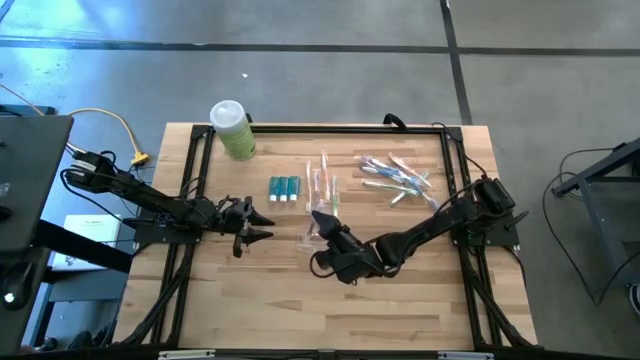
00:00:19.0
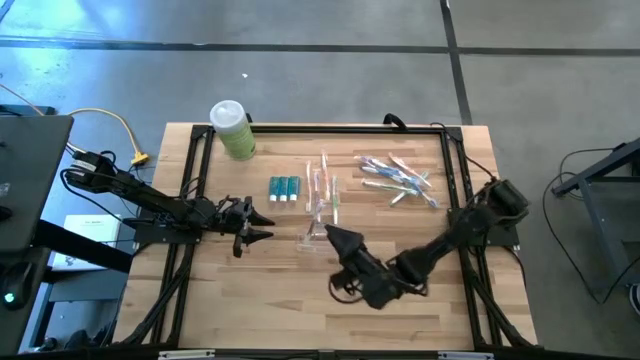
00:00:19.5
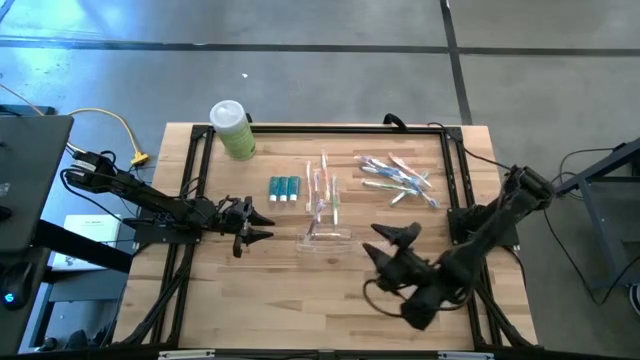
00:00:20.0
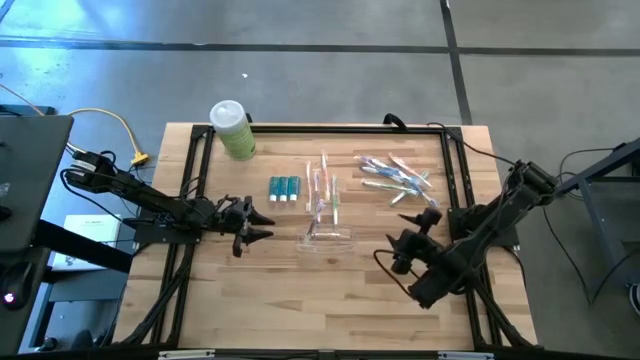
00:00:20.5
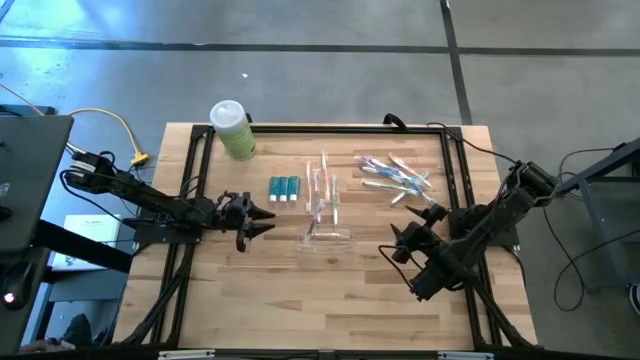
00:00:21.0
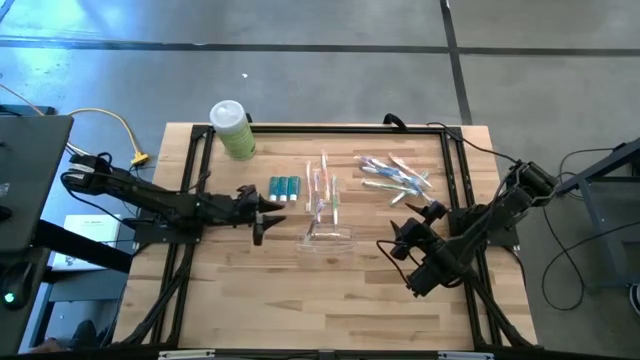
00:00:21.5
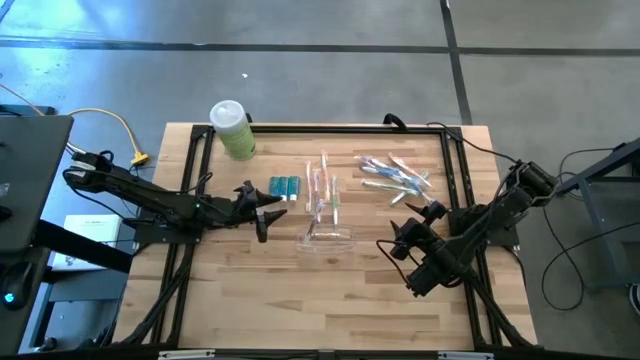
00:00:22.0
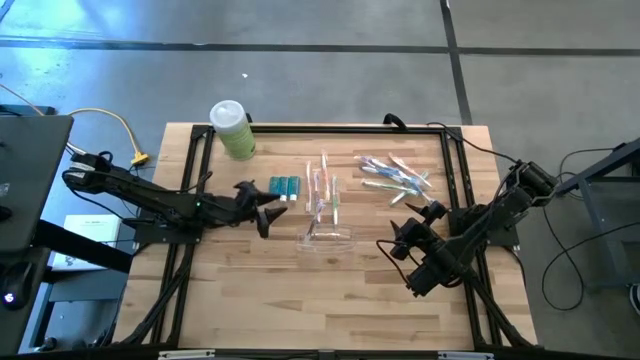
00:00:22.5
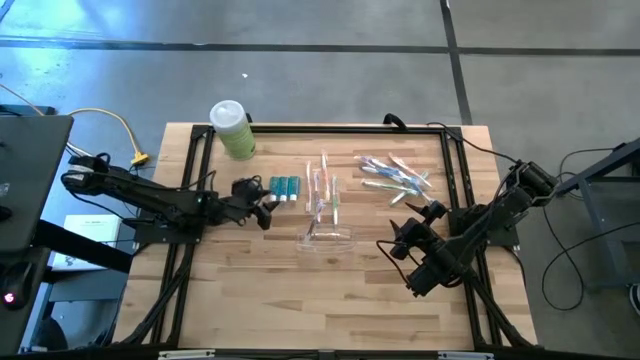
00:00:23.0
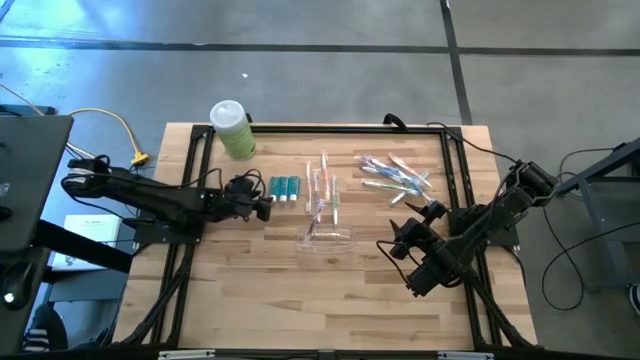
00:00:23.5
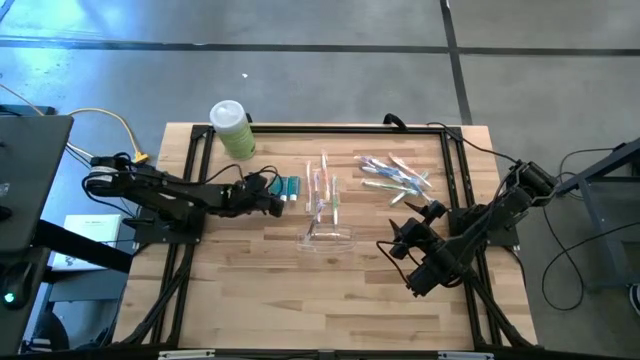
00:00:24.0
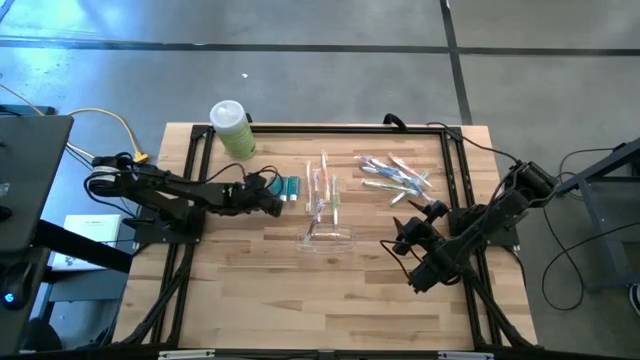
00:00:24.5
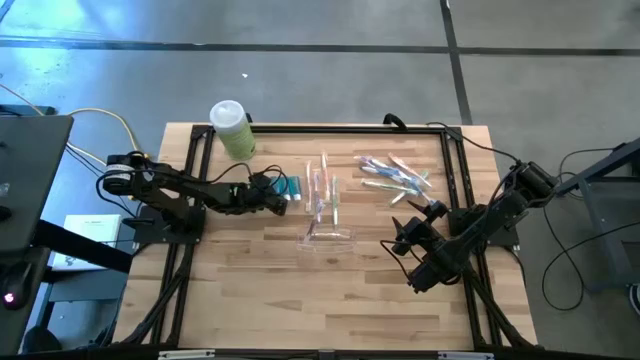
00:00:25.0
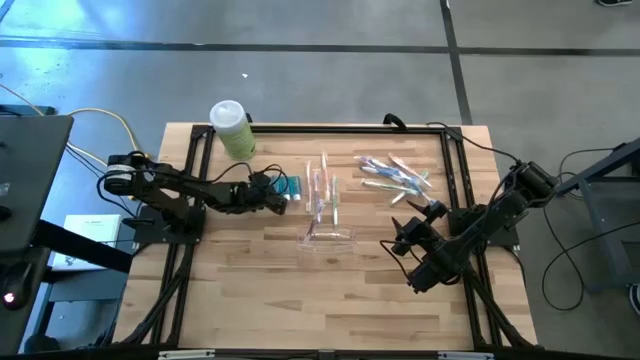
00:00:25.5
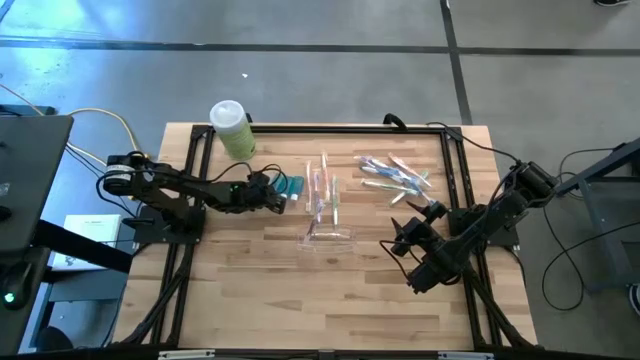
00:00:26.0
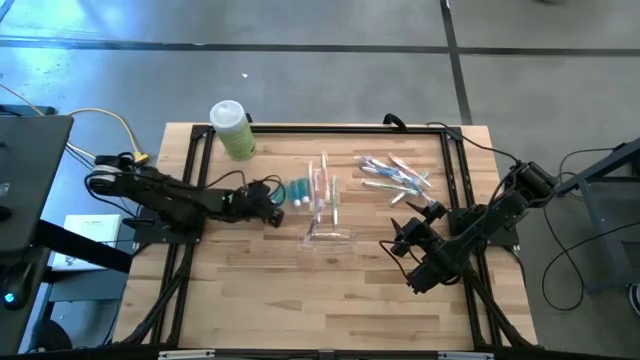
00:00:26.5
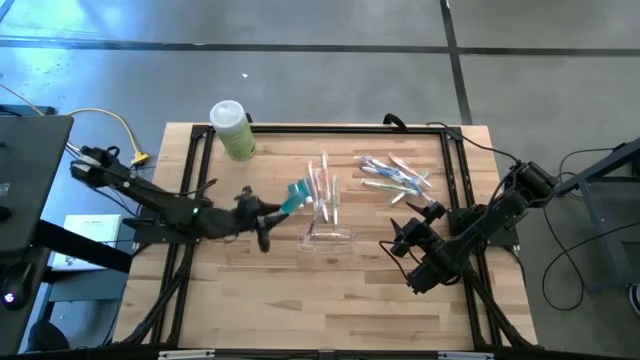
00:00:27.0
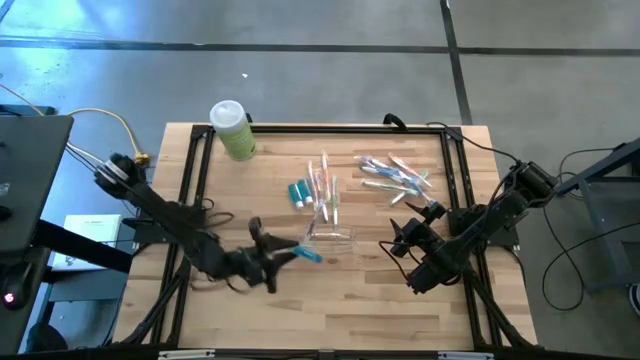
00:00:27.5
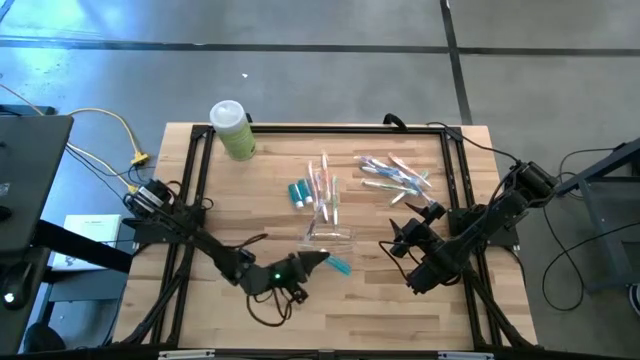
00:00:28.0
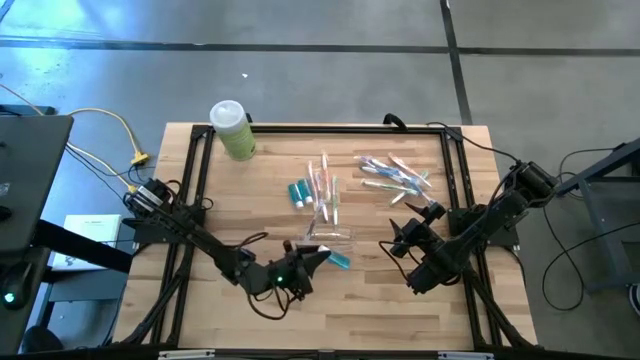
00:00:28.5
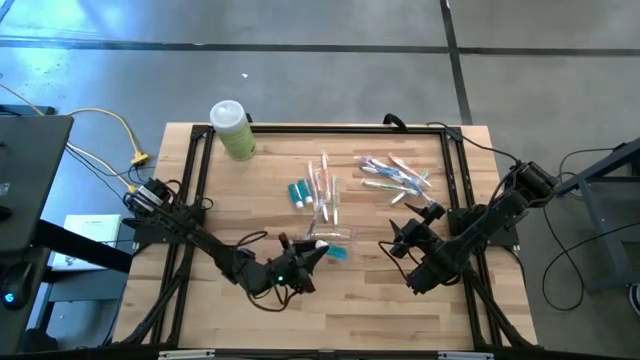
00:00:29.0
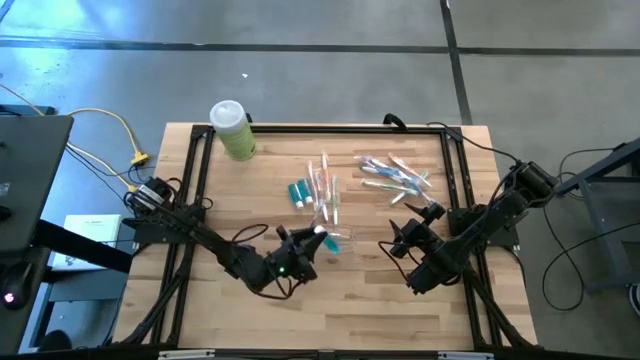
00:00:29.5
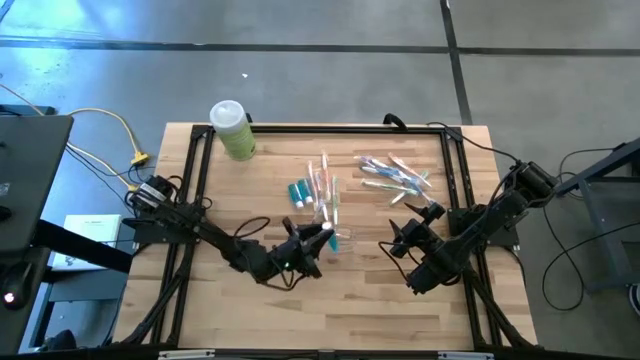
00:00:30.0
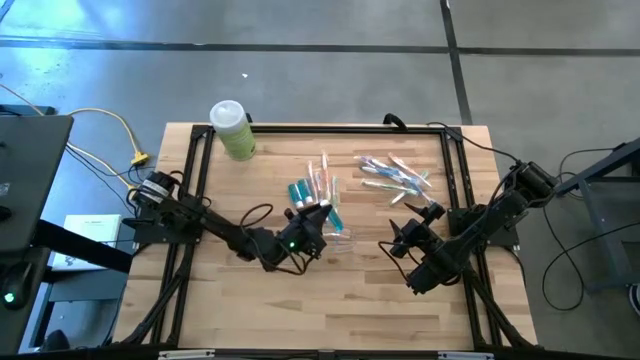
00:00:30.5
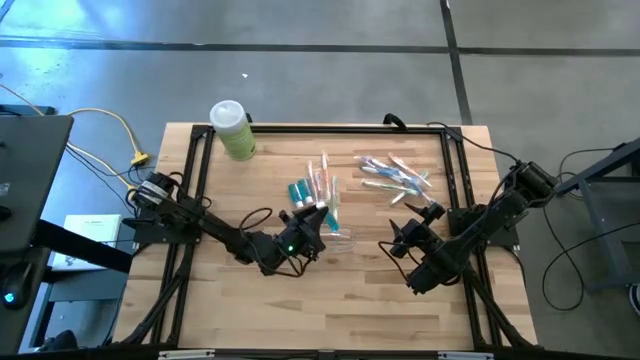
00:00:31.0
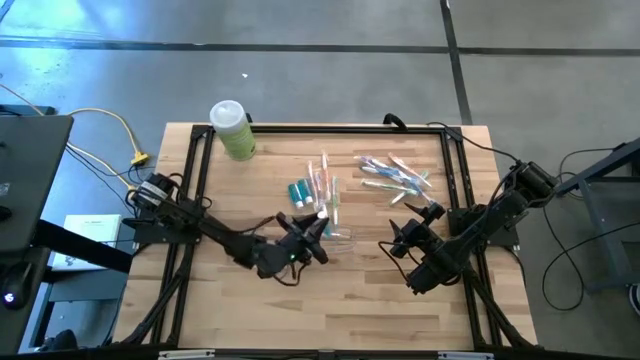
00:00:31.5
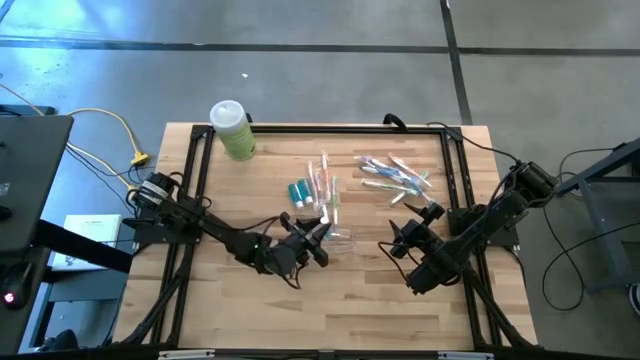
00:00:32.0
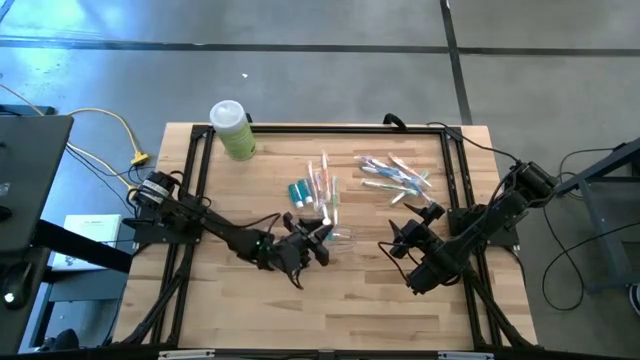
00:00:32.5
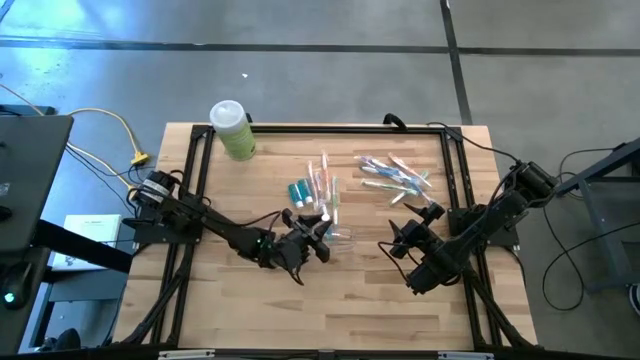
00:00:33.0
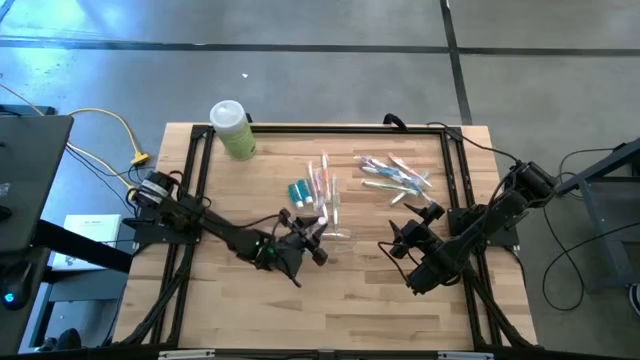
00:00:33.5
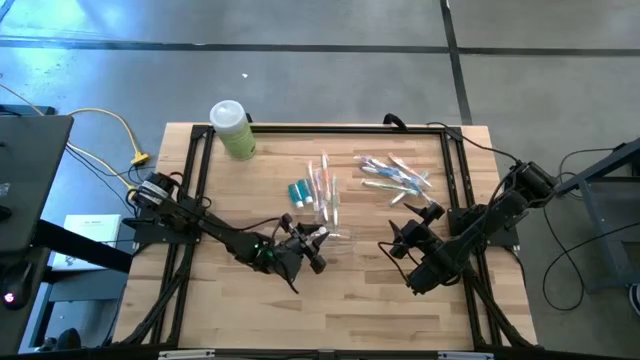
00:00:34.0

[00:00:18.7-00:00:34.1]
Task: Pick & Place toothbrushing station
Put the mouthwash into the transparent organizer

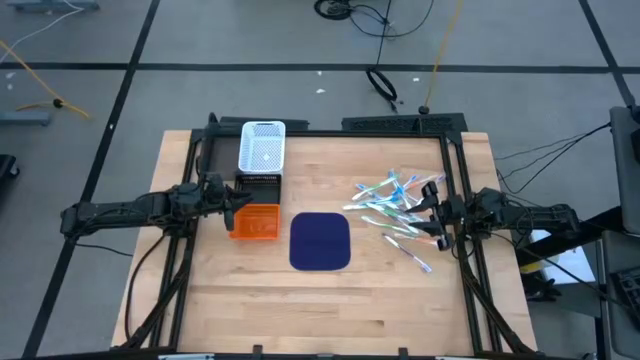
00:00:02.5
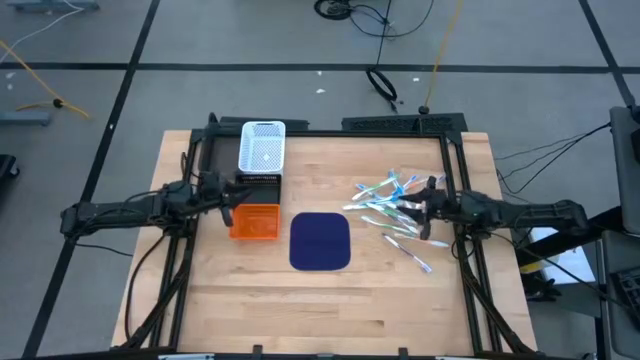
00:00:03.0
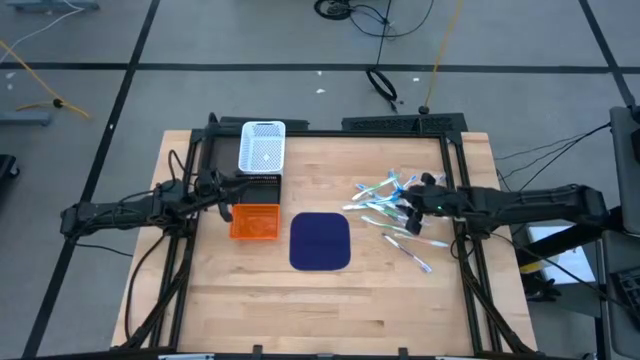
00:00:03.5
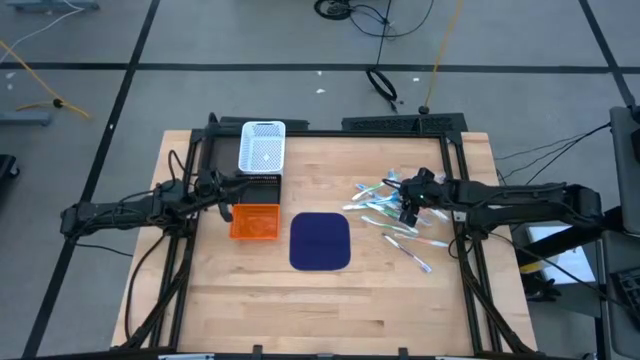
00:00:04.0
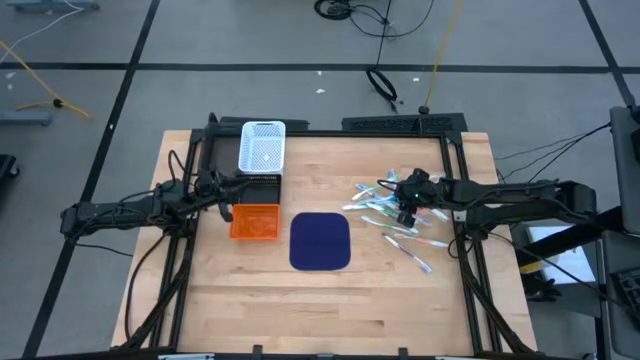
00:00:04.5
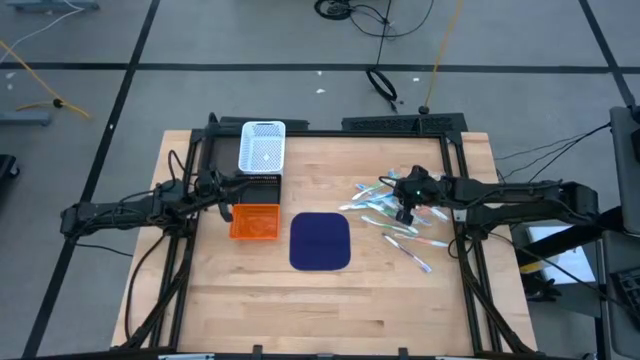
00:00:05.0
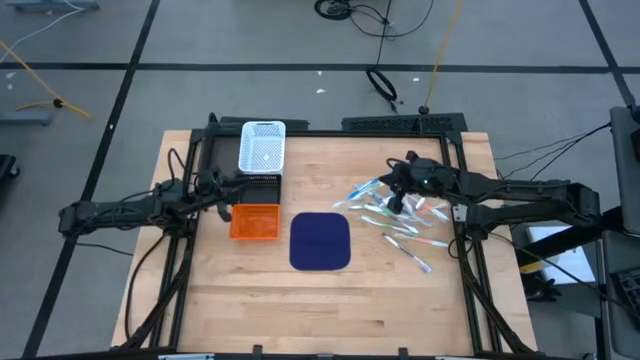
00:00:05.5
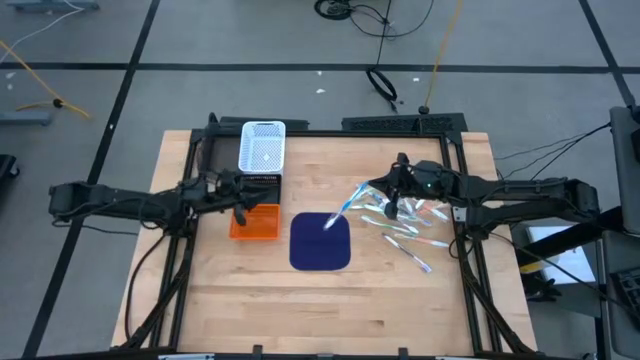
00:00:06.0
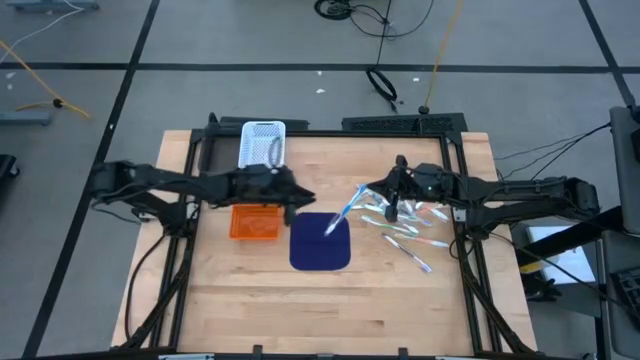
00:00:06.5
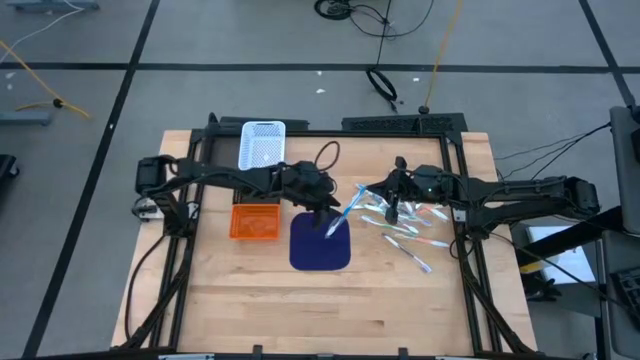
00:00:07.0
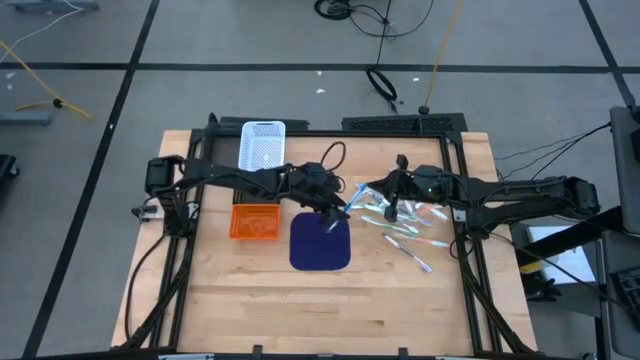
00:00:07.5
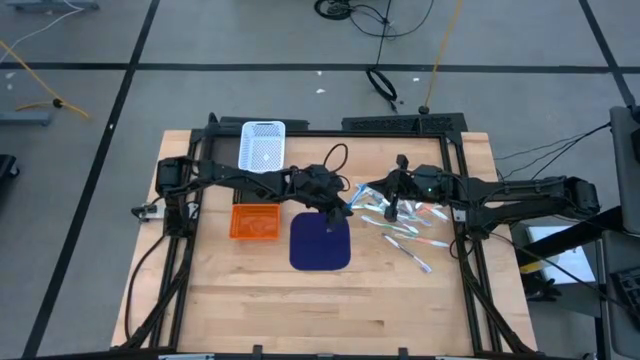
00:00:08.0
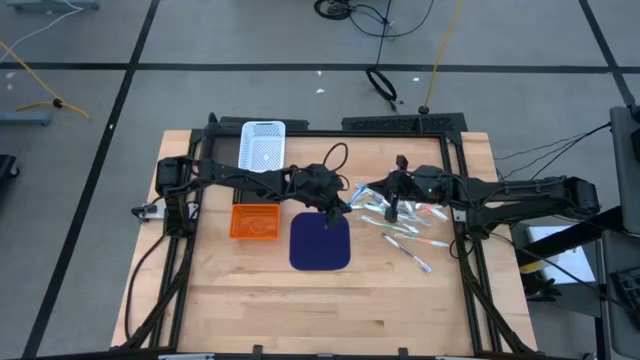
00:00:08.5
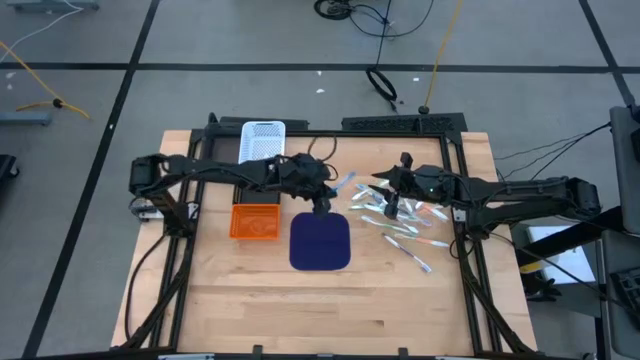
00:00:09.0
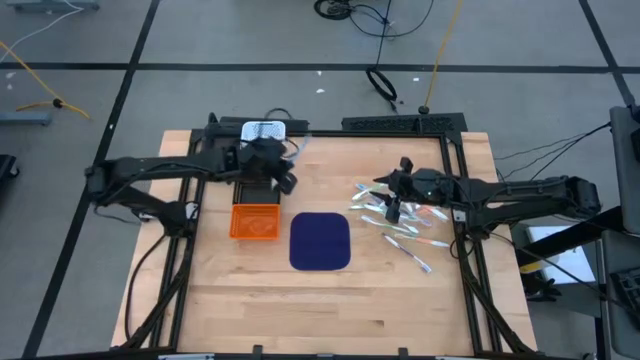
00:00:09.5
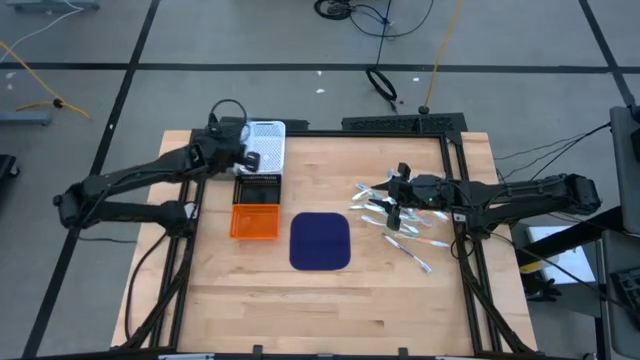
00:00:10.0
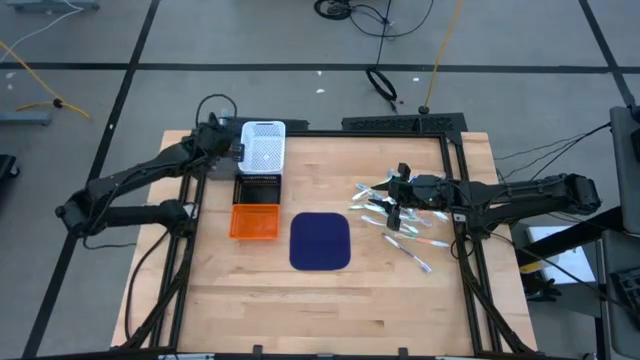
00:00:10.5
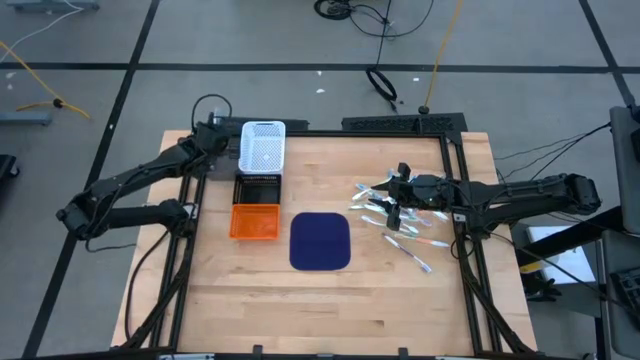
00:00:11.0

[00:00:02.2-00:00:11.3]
Task: Pick & Place Toothbrushes
Put the blue toothbrush into the gray bin
